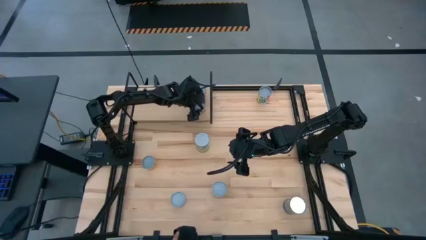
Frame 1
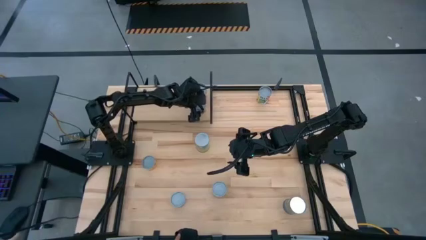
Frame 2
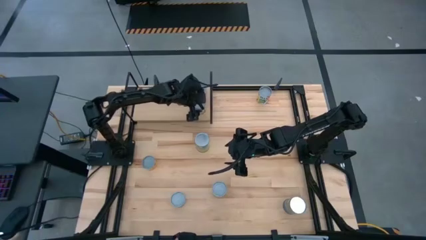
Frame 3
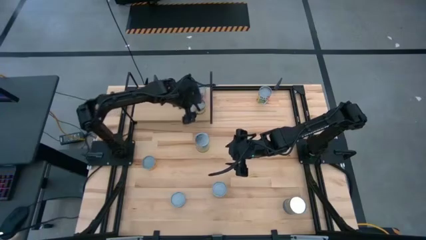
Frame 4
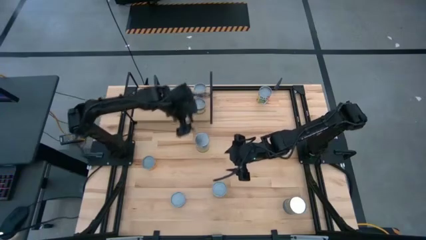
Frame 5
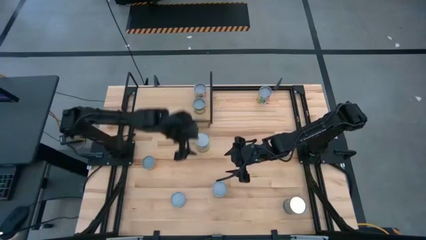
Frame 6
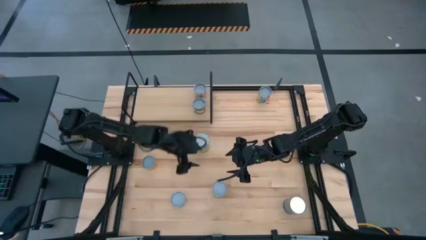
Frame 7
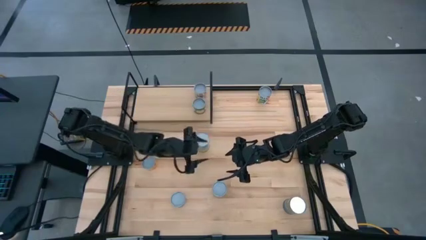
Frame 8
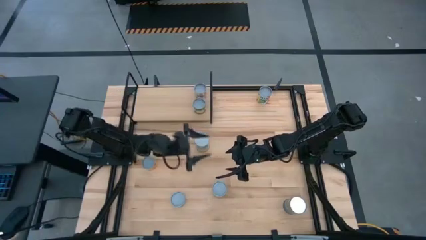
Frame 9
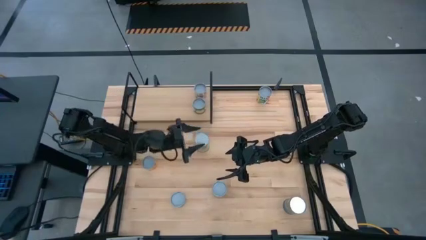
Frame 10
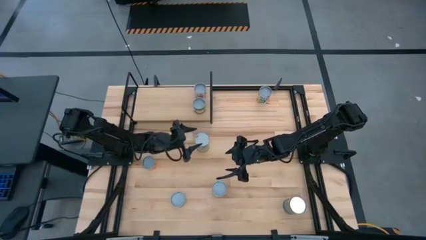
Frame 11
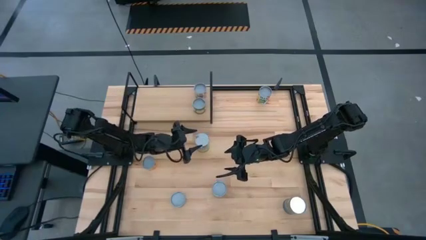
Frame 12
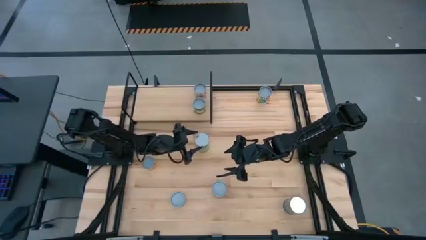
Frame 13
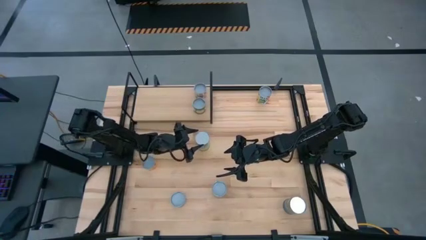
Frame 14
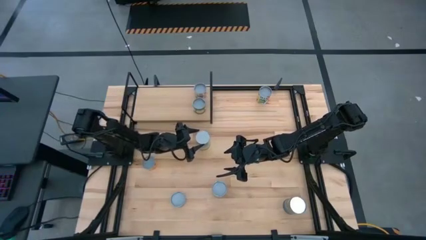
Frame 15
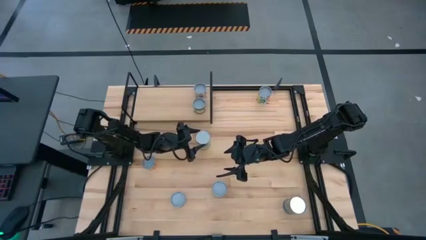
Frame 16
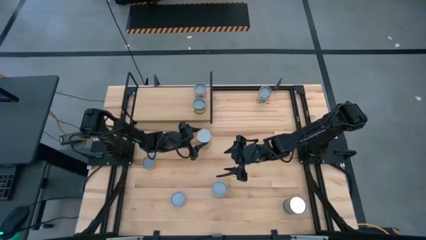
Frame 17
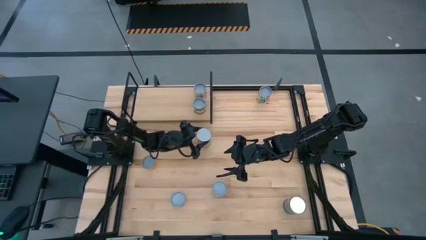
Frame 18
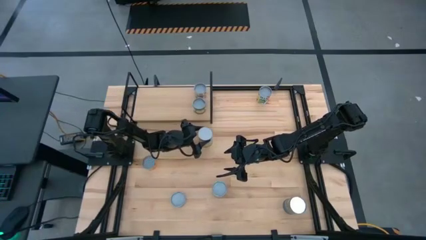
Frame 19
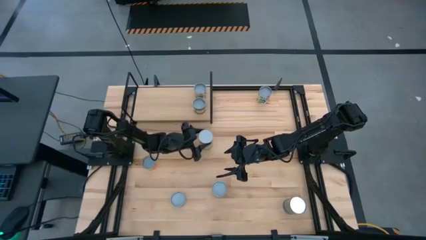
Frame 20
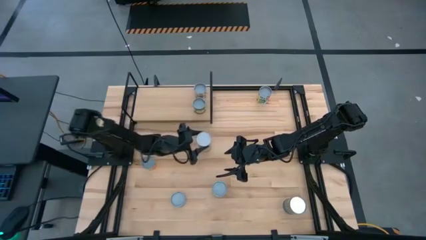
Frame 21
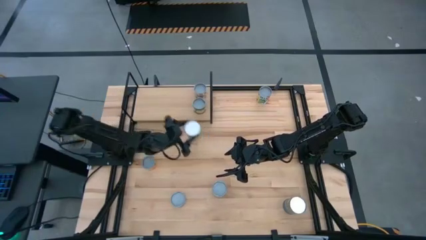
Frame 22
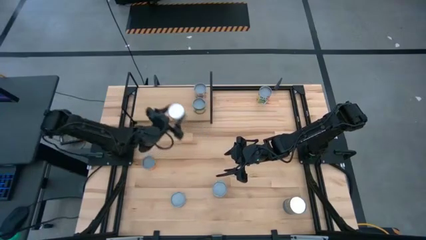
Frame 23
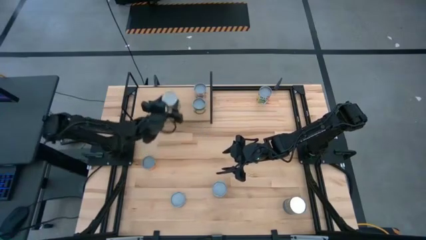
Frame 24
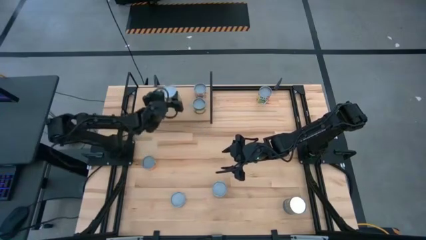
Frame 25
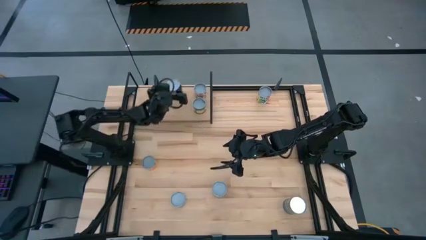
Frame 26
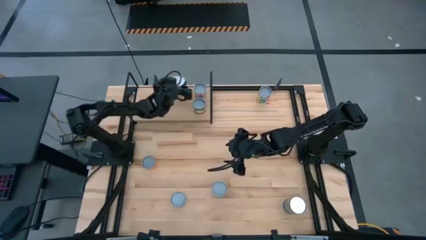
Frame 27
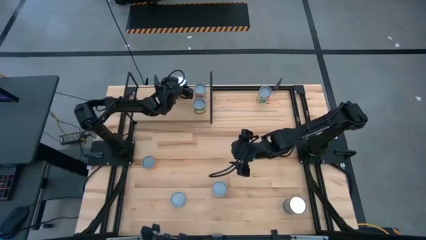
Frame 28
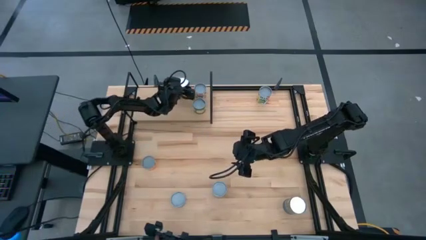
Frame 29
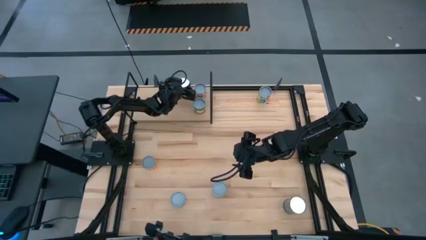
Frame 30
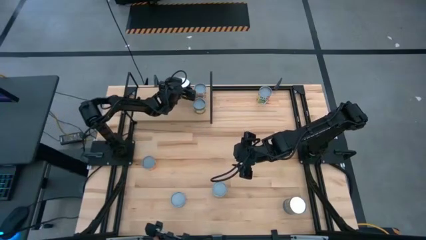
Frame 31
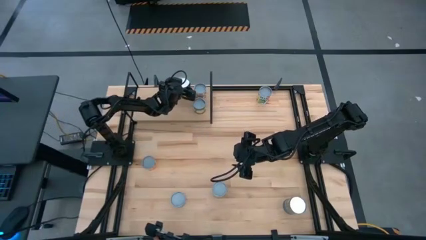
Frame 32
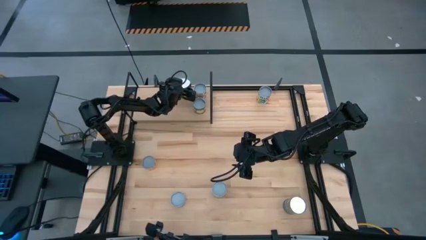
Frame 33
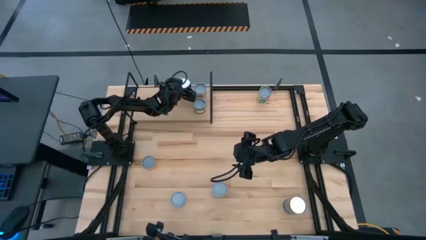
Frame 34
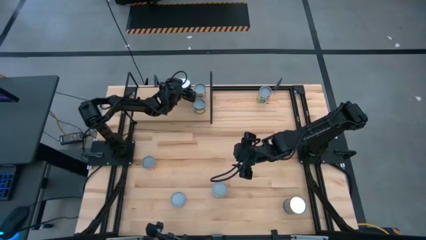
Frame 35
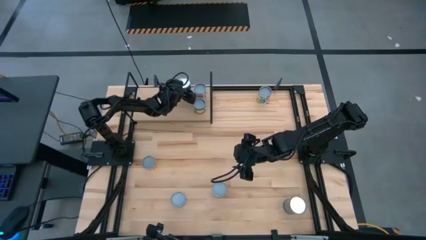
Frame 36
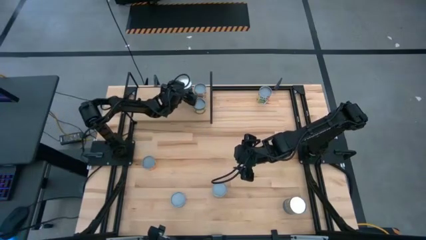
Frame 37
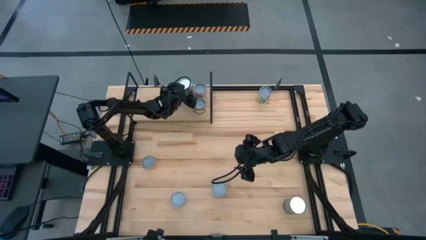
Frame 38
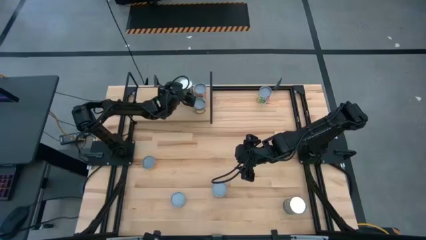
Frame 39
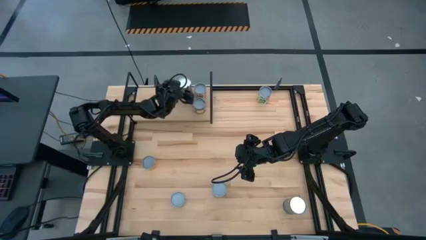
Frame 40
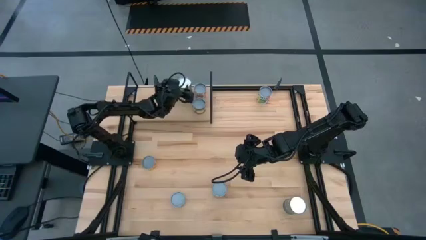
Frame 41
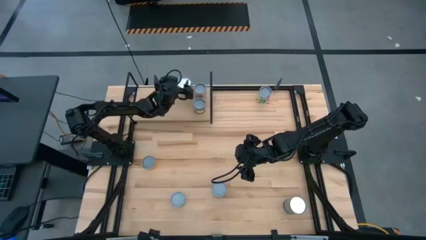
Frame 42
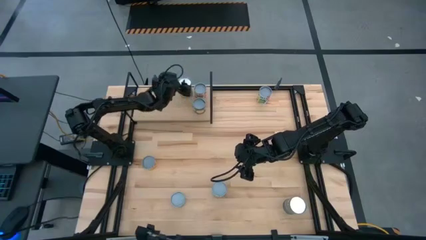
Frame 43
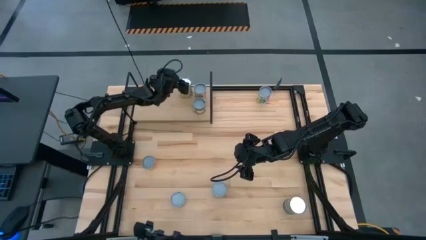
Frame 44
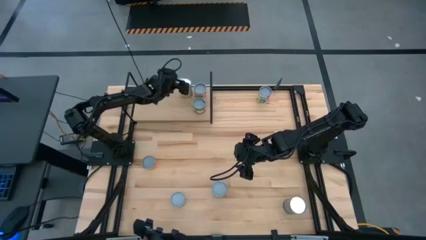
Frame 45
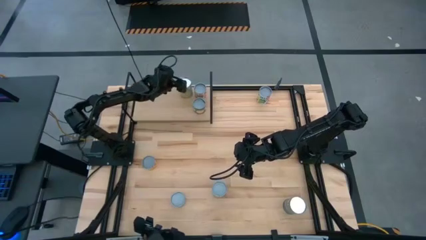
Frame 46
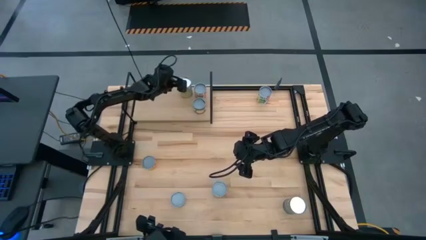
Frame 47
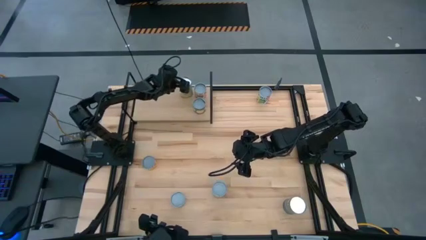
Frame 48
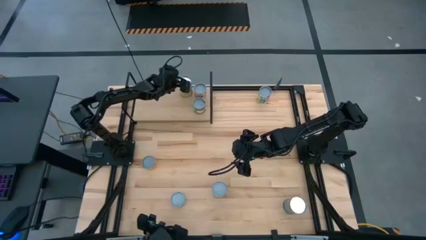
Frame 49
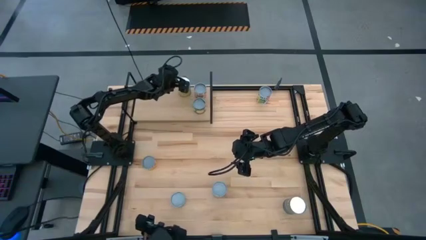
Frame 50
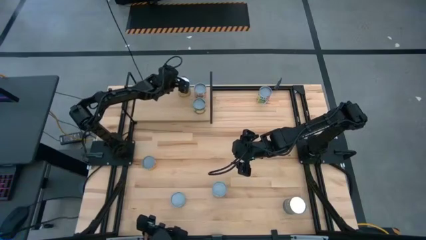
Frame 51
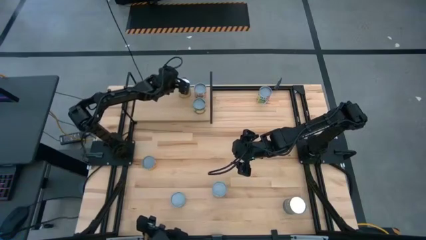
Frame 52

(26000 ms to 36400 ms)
Task: Pick and place cans onto a shelf
Put the canned carrots on the shelf

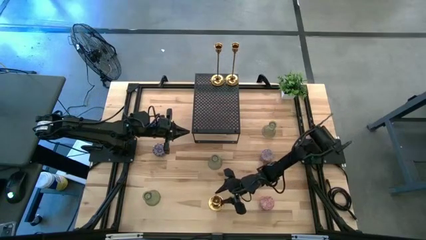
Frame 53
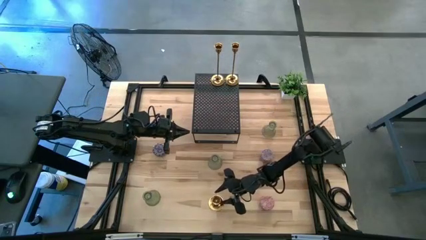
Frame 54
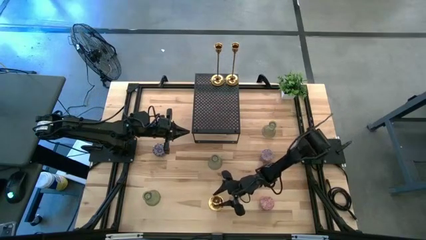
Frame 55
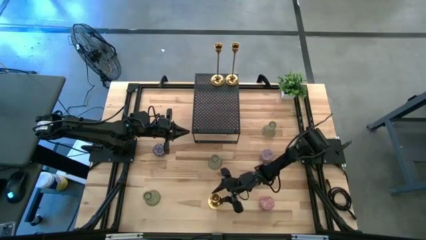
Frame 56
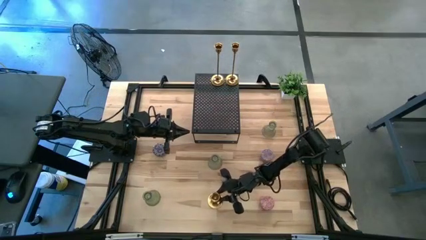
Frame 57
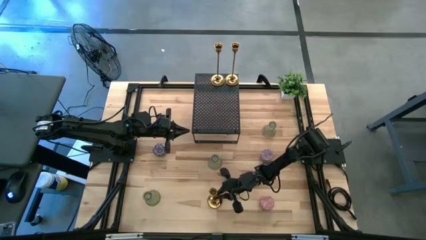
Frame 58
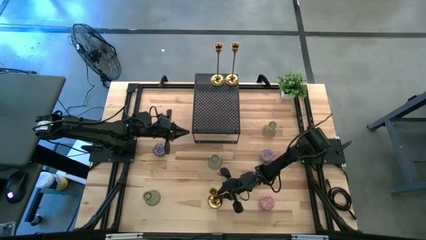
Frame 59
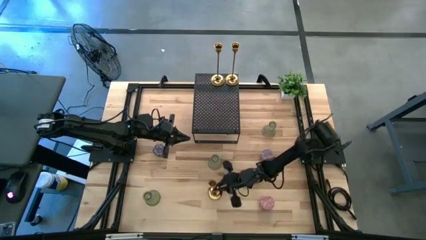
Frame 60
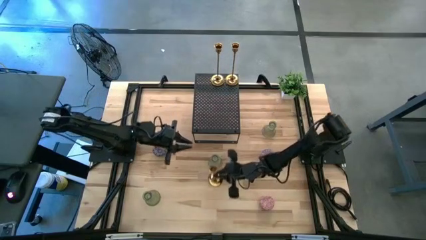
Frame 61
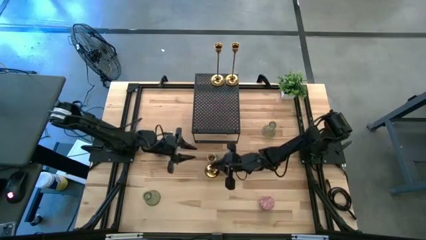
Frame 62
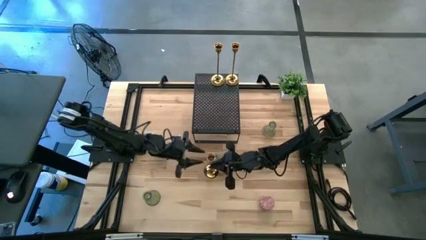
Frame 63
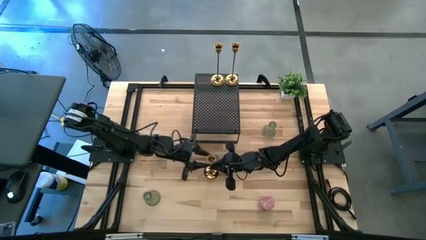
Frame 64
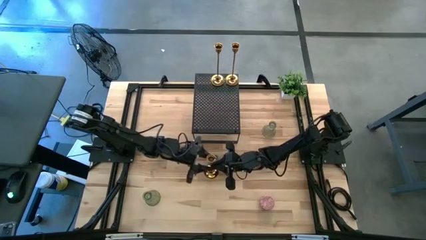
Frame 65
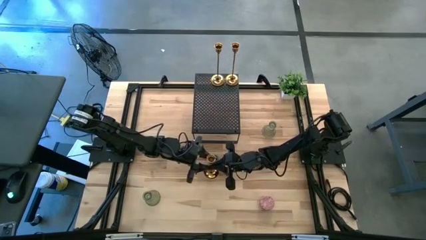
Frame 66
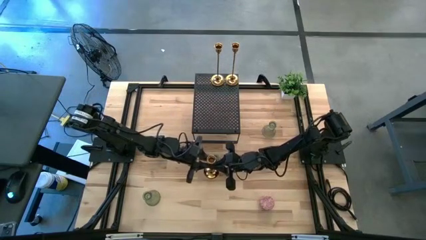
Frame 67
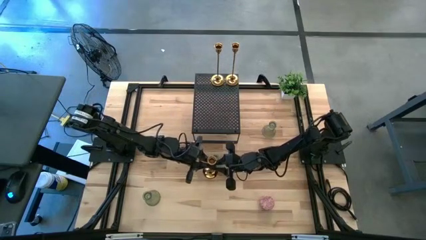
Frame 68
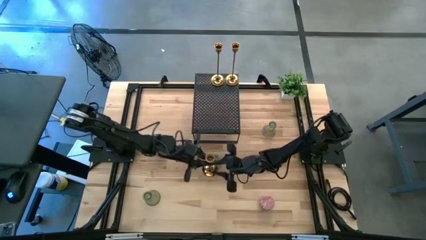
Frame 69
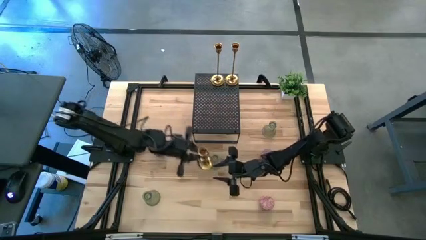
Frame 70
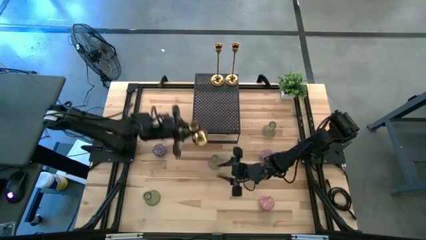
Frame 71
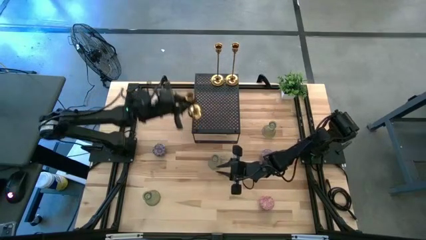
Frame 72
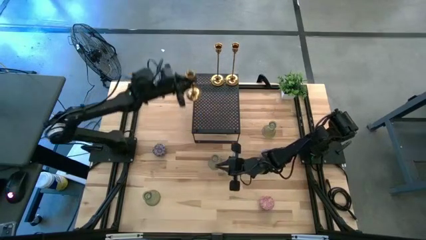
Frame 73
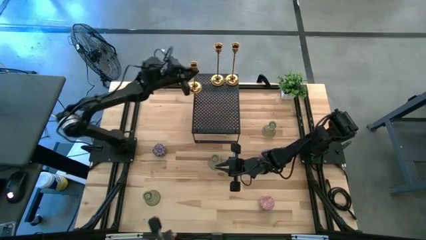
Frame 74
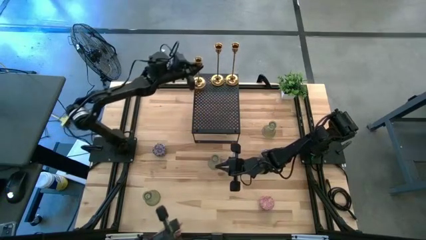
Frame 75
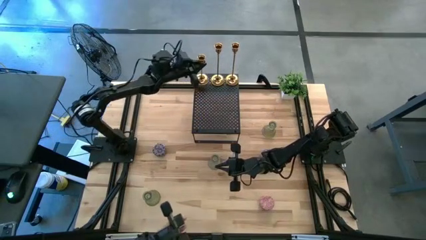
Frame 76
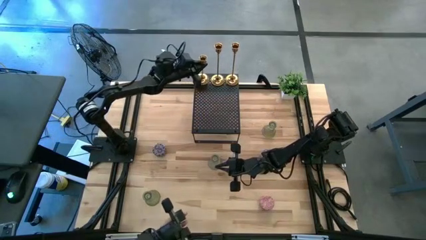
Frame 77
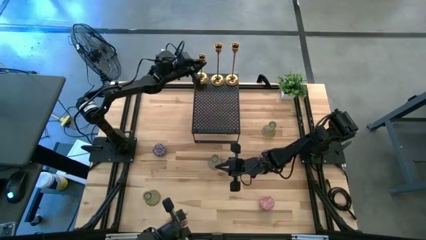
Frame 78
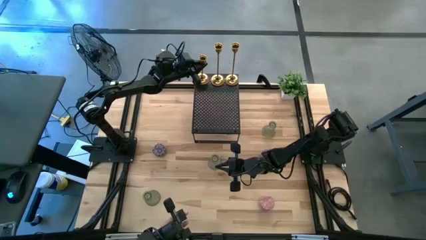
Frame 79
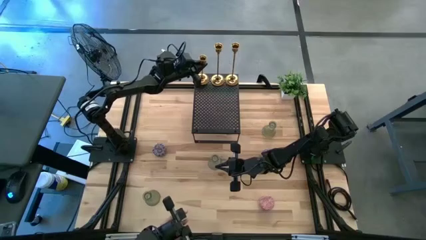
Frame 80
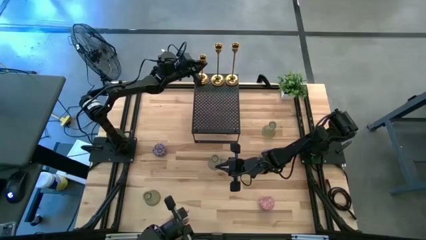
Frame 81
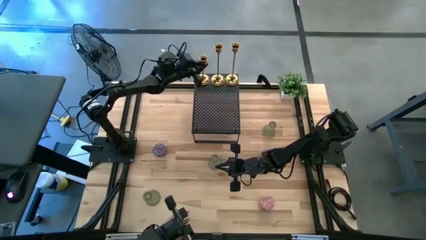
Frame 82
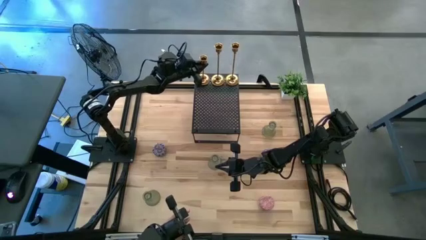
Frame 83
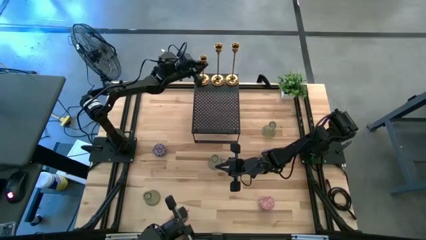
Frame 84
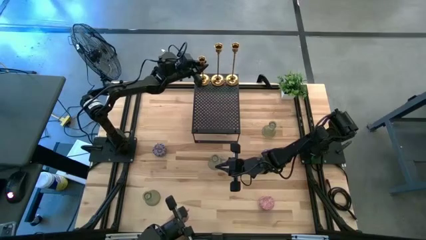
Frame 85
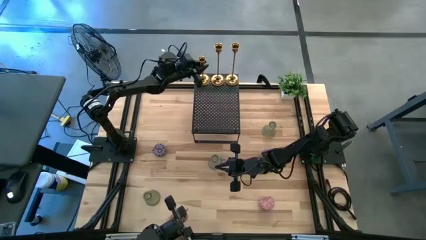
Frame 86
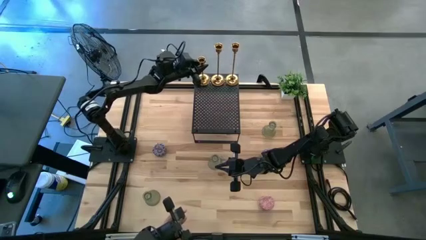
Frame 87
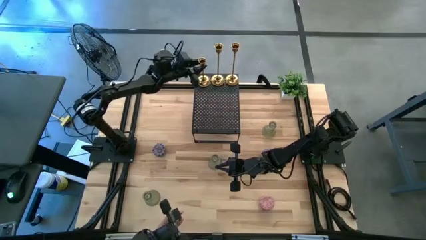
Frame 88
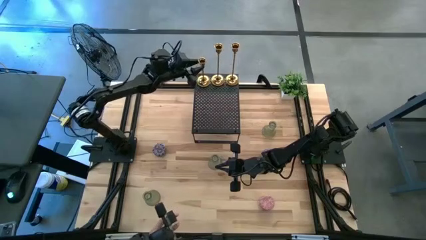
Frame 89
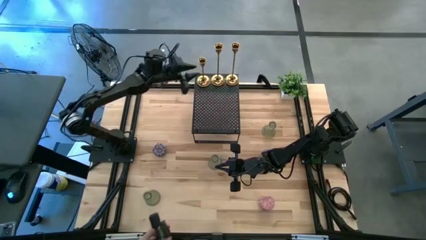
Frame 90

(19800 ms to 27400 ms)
Task: Pick & Place candle stick holders
Put the gold candle holder on the shelf
